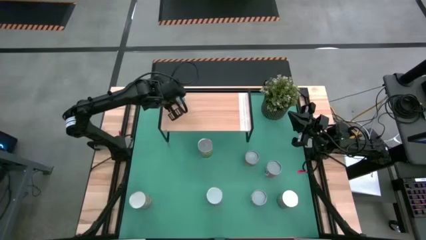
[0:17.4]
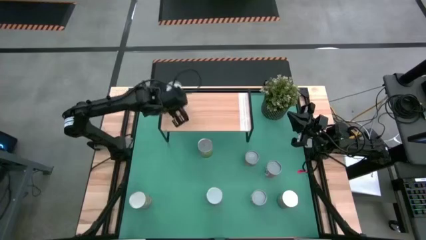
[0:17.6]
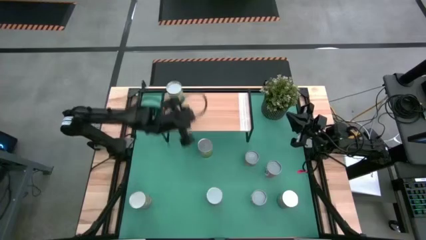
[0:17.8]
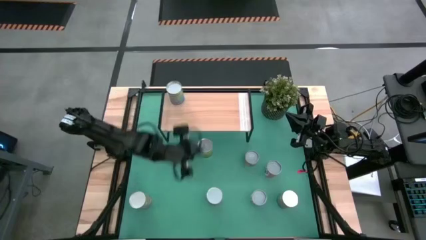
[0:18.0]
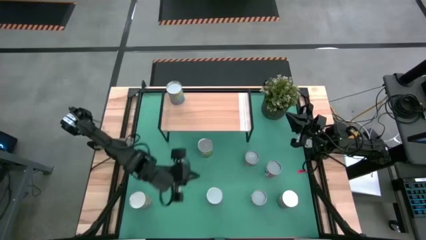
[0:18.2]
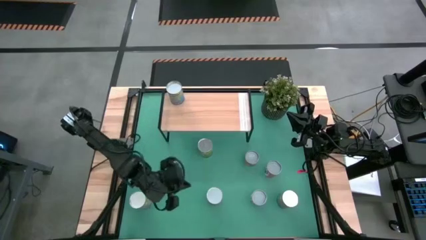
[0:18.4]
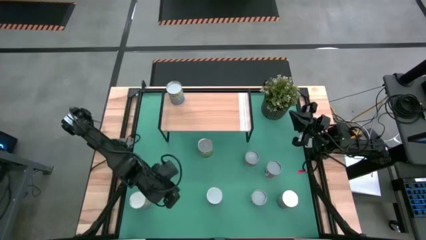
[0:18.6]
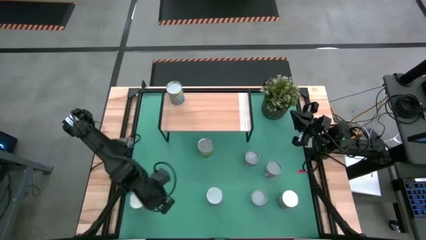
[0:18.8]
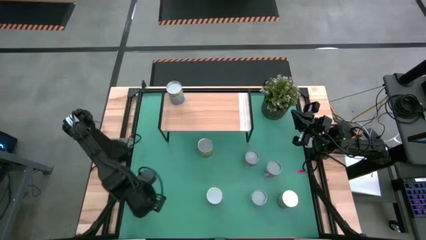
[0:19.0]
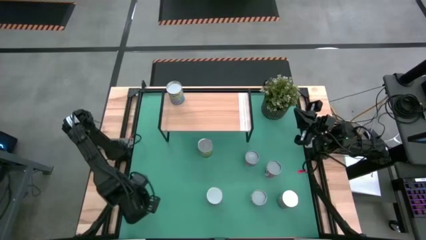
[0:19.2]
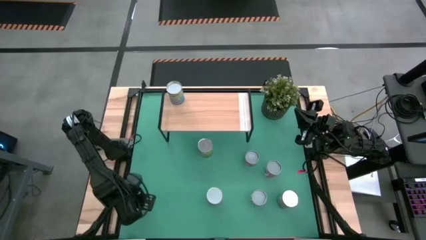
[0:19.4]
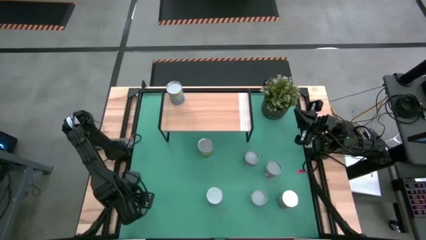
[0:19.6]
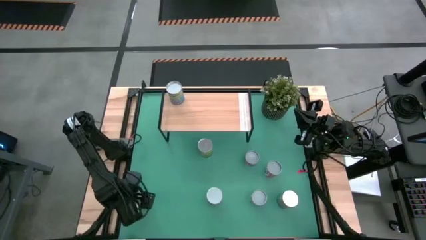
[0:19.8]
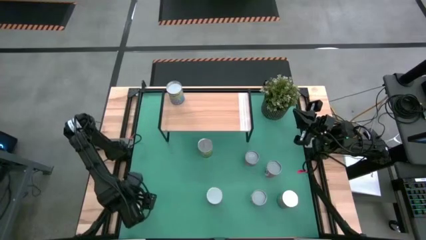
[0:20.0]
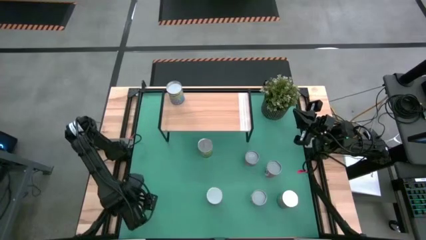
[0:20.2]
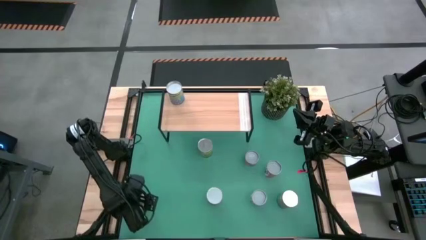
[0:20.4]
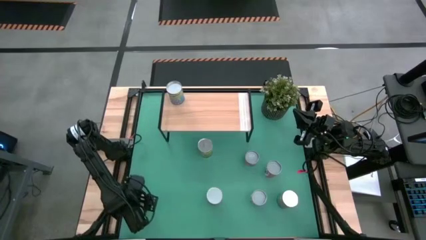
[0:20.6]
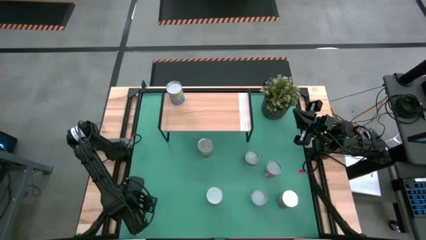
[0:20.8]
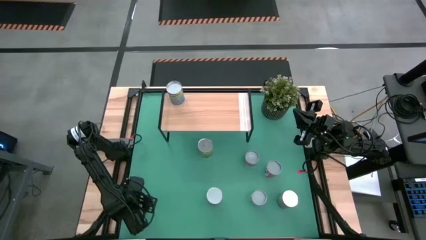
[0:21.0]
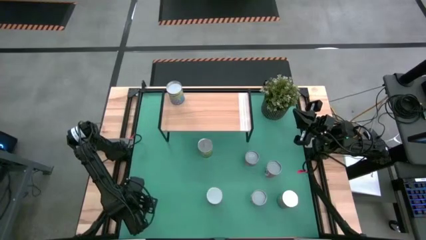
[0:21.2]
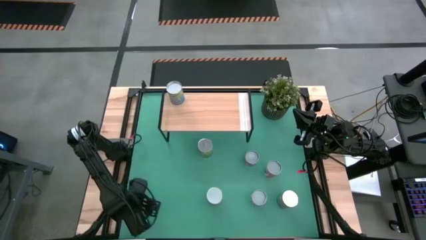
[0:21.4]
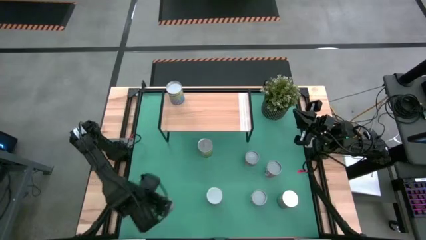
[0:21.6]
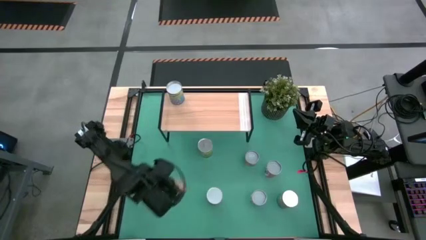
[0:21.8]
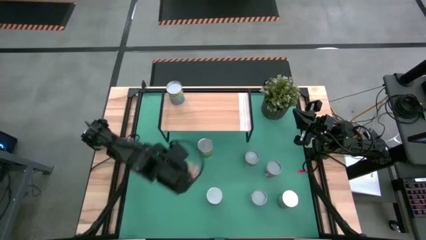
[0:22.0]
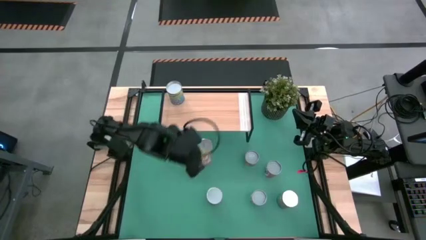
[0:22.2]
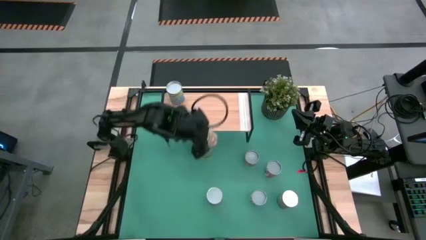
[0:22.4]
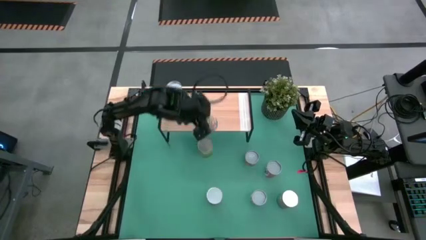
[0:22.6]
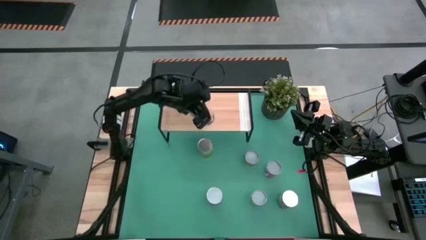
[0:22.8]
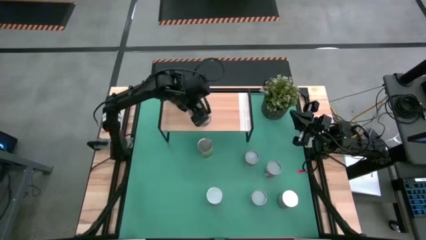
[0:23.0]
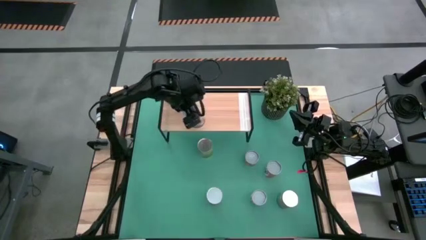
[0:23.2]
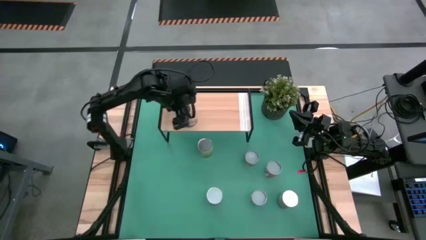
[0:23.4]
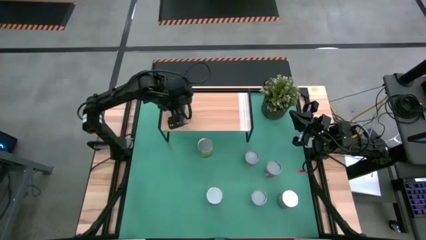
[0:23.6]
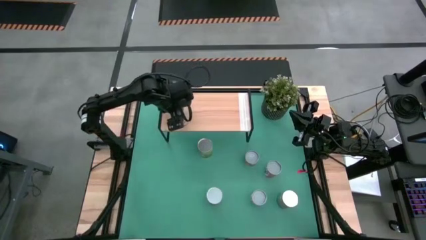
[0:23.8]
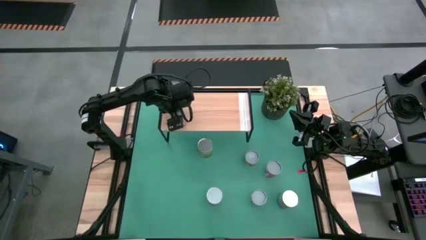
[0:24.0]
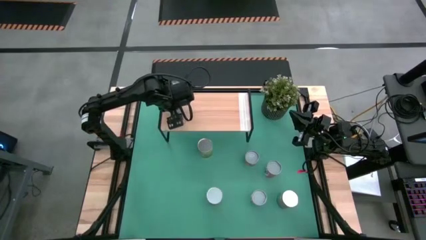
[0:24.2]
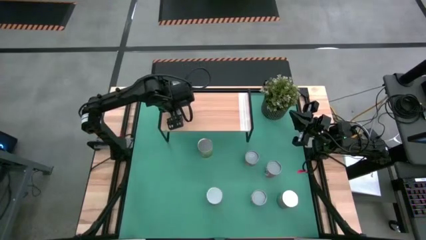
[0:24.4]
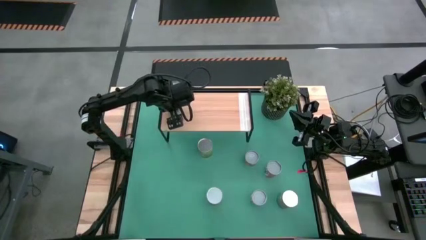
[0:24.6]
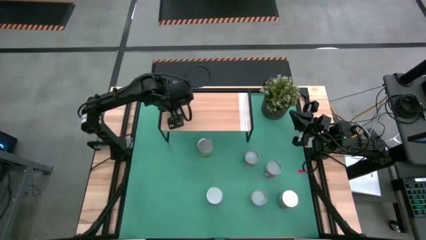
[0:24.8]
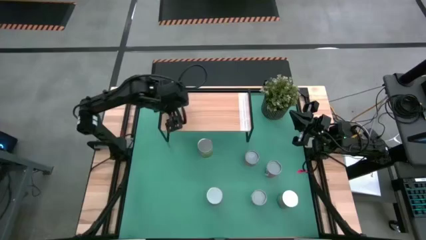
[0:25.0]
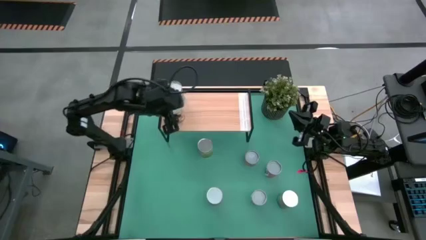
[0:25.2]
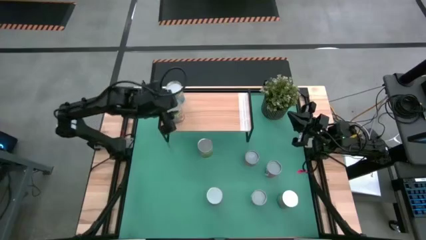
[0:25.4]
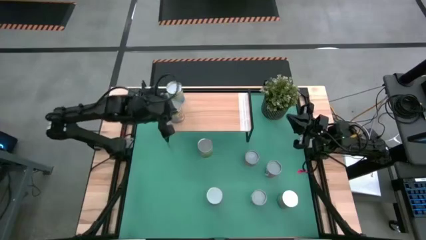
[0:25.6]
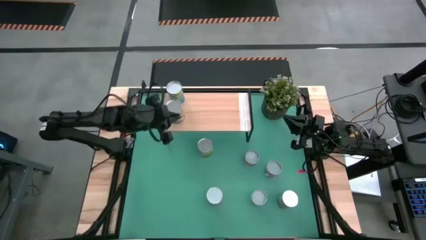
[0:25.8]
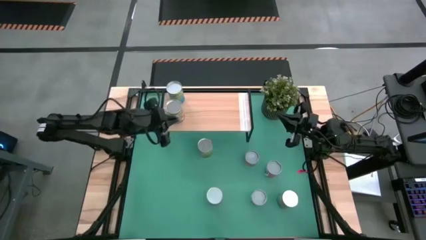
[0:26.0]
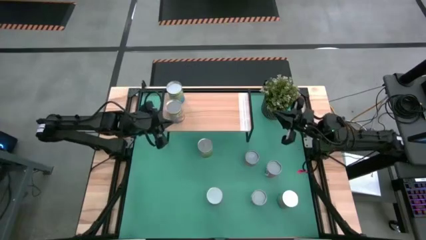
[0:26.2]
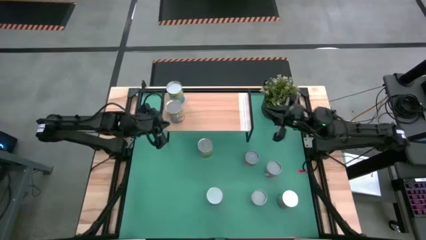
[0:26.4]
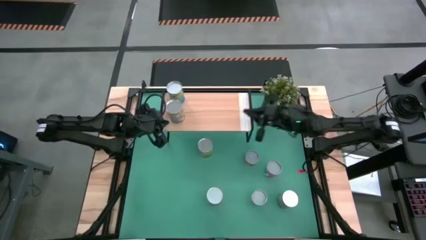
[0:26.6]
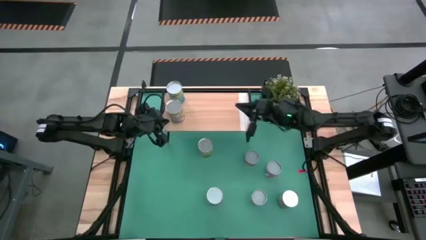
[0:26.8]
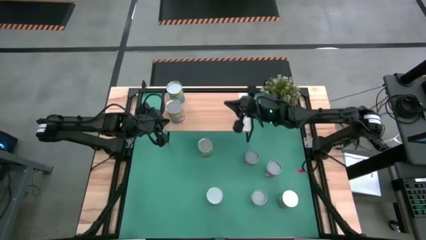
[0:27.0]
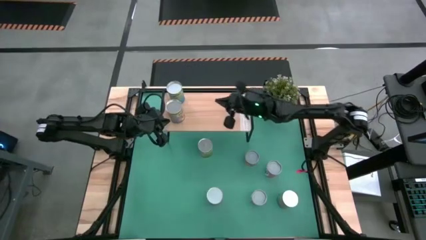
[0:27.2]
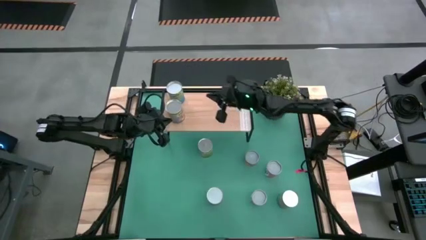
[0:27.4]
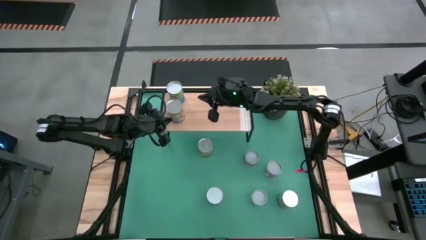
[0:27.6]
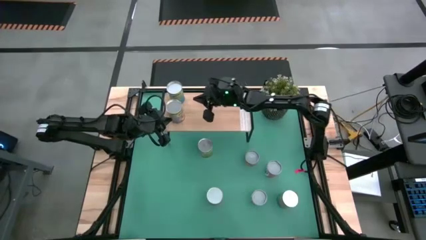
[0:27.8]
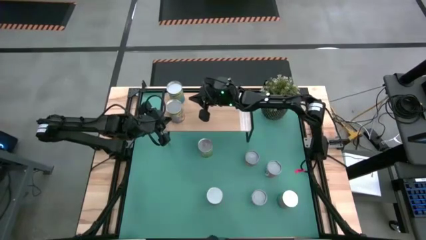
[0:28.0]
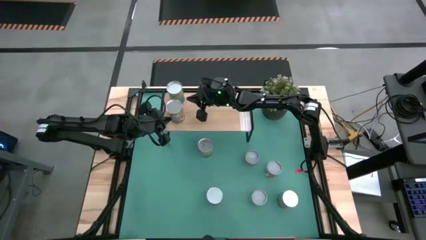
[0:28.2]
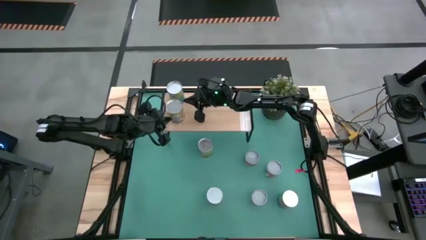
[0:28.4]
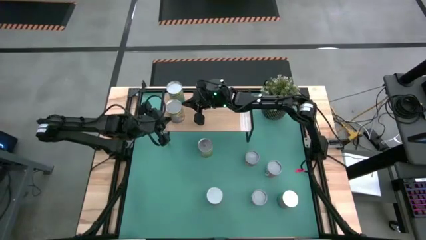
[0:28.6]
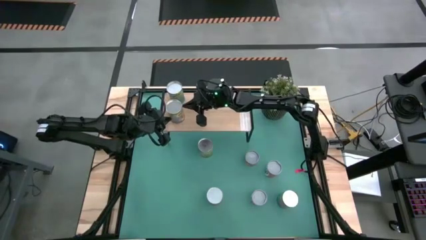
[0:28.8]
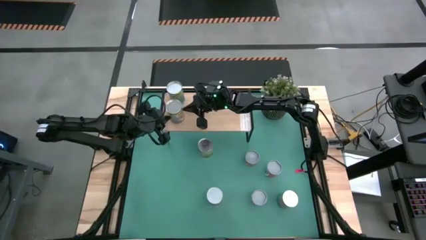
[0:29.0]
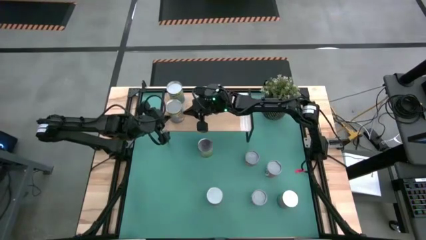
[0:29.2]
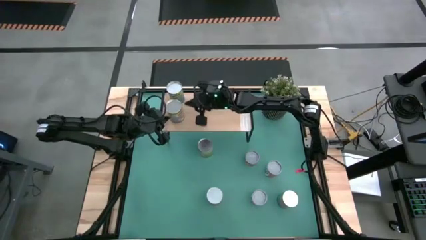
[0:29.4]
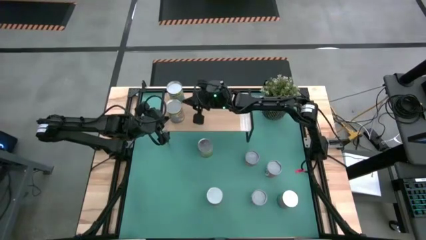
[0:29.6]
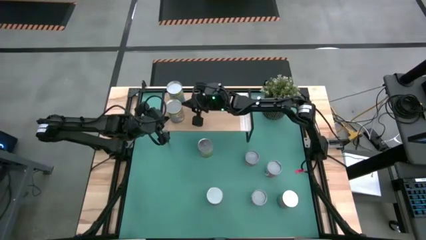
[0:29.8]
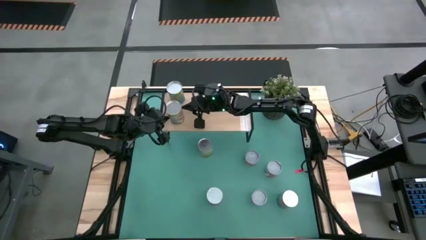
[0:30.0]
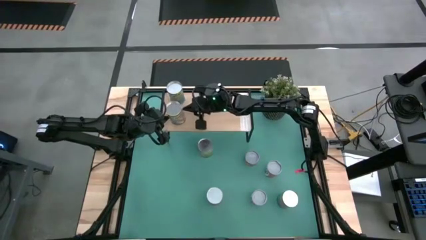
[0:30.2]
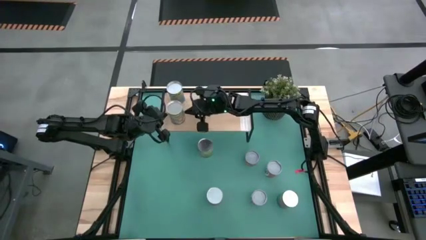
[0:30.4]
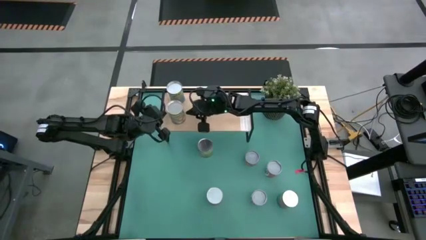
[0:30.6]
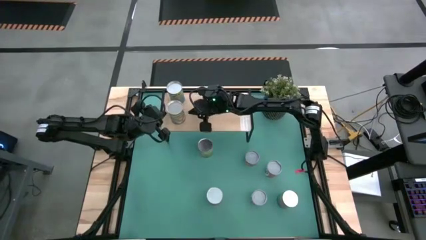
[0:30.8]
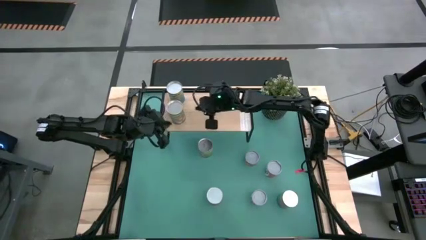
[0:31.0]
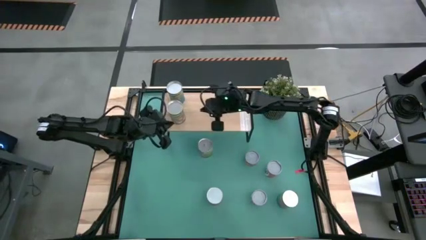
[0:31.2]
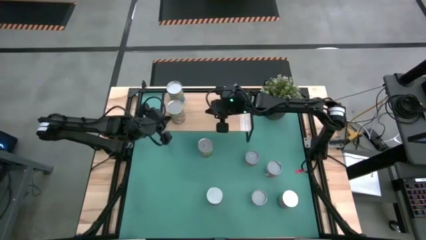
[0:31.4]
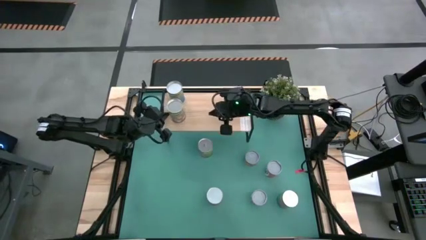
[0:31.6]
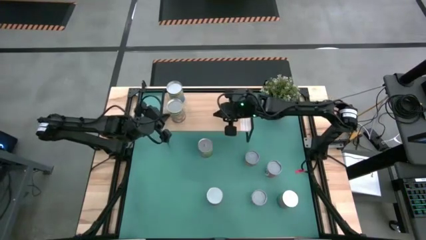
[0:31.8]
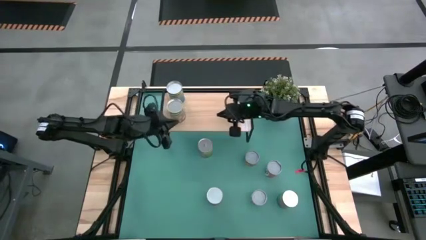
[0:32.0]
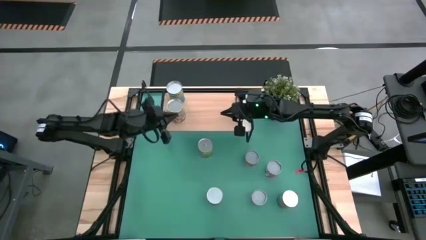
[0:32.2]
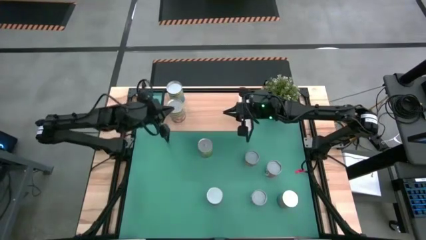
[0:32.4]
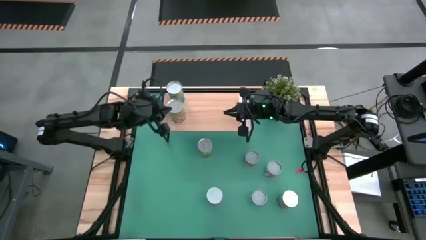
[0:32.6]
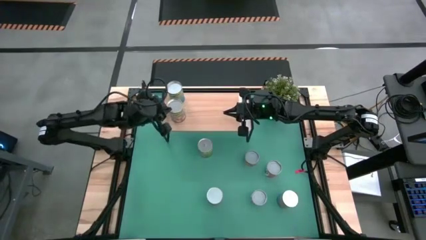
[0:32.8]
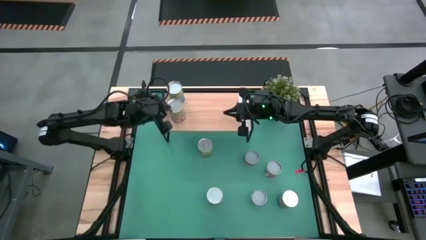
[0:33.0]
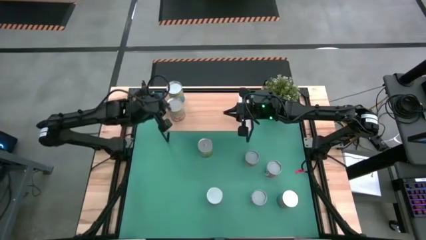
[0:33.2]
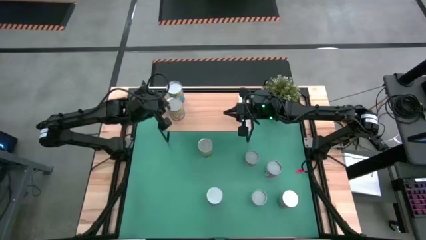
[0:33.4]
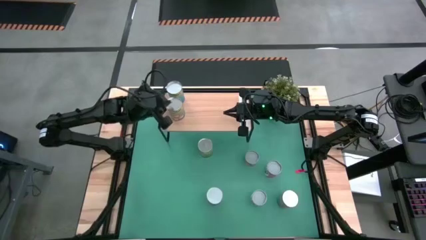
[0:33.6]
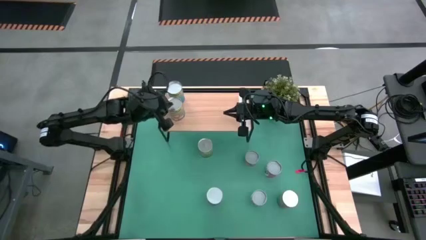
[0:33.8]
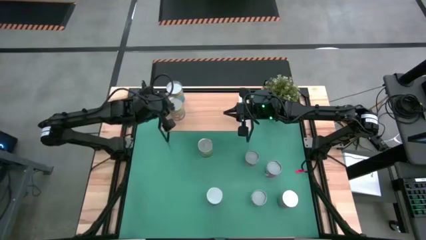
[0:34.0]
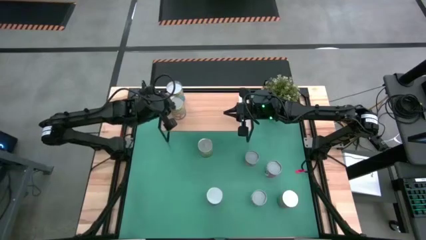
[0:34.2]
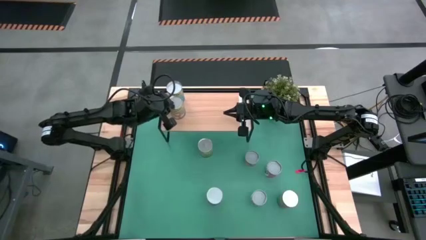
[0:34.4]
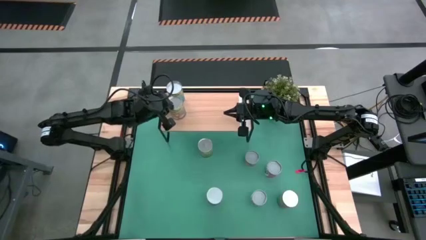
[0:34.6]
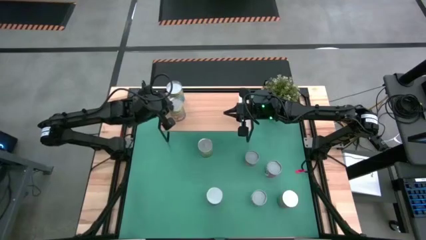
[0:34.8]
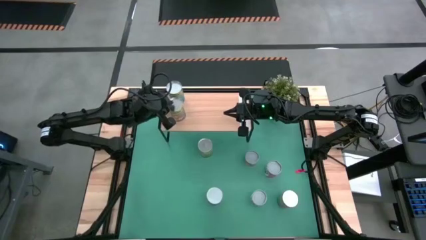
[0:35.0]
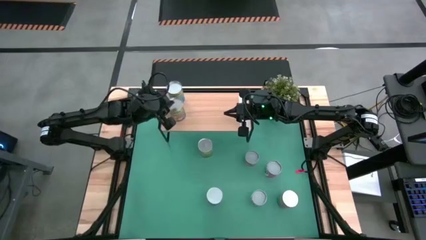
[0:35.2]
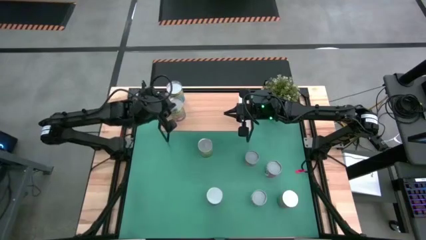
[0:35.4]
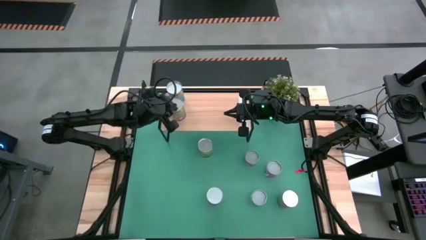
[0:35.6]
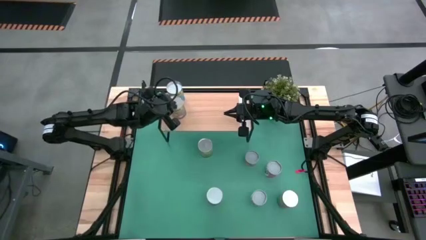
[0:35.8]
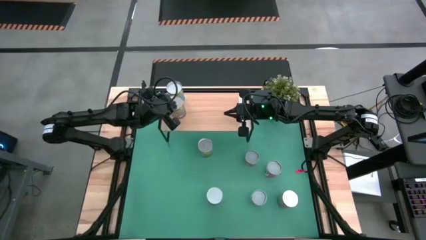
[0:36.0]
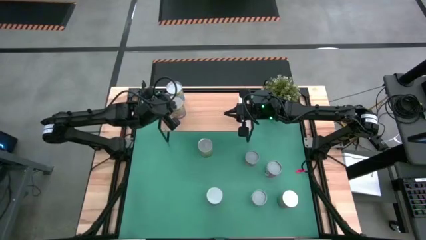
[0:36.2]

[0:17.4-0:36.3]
Task: Pick and place cans onto a shelf
Put the canned peaches on the shelf
